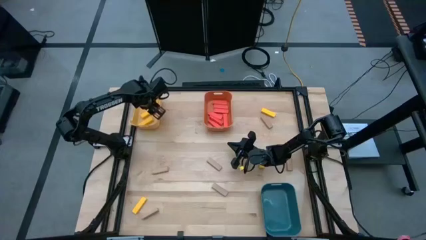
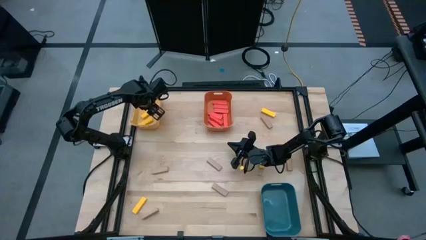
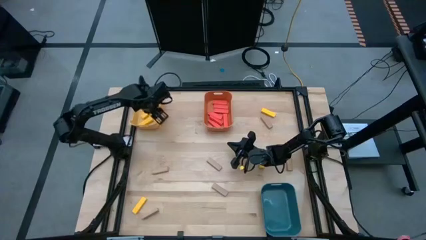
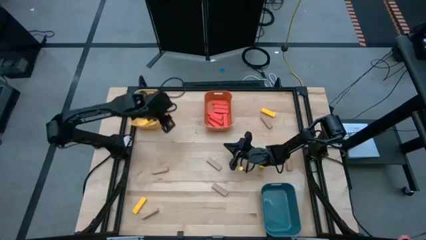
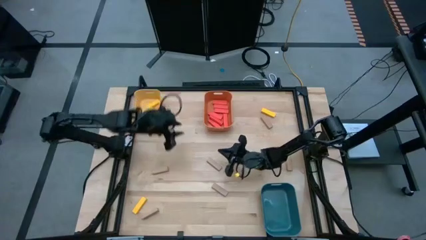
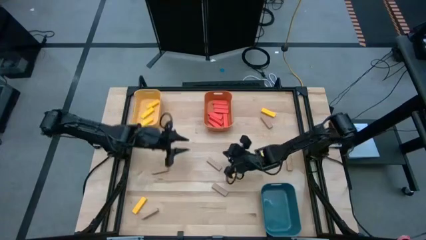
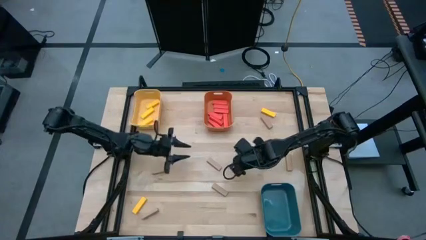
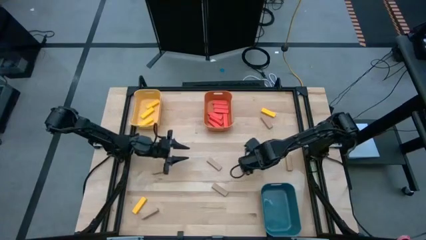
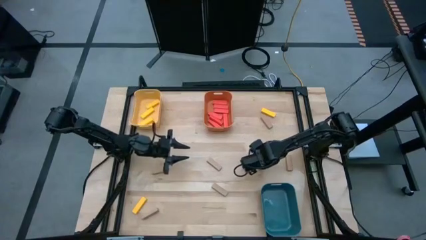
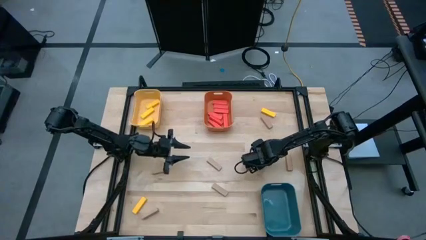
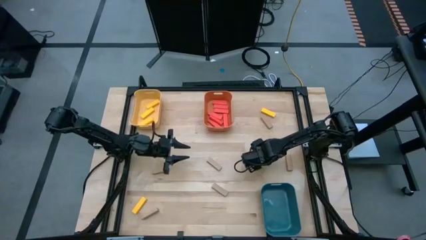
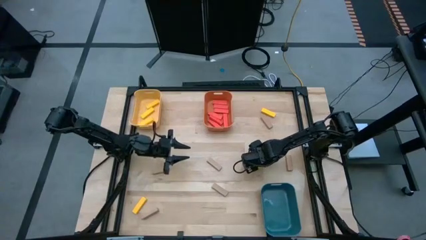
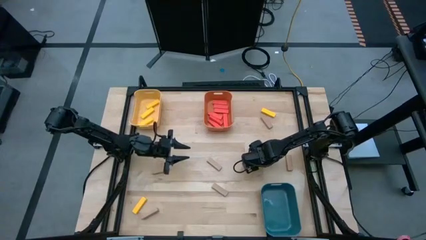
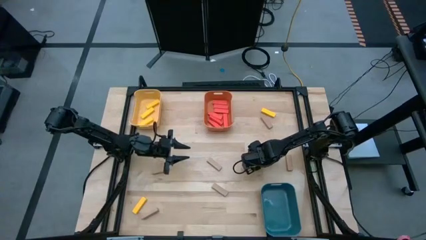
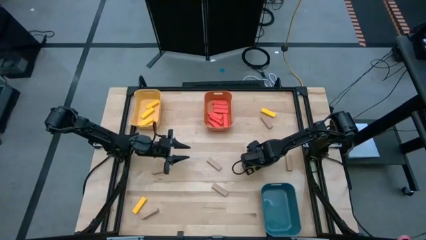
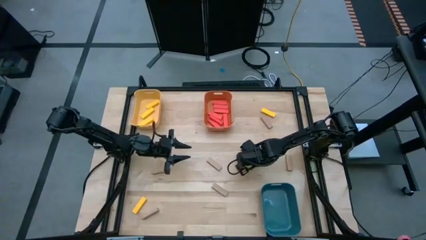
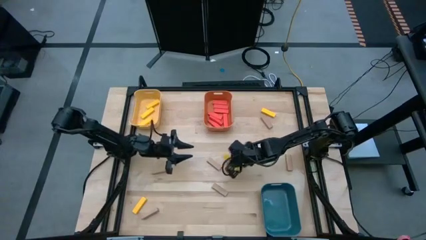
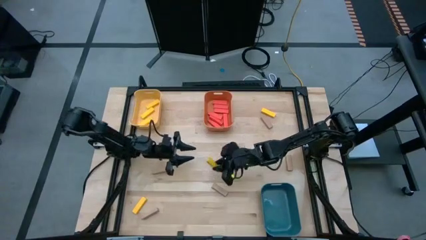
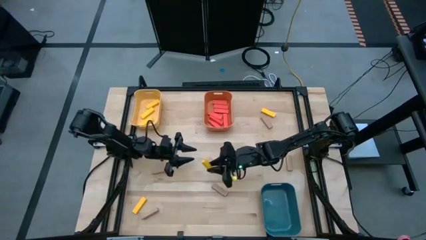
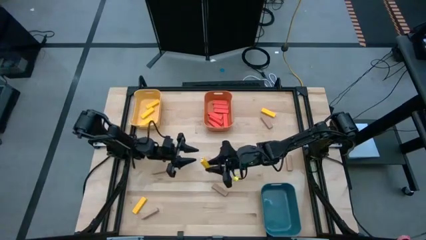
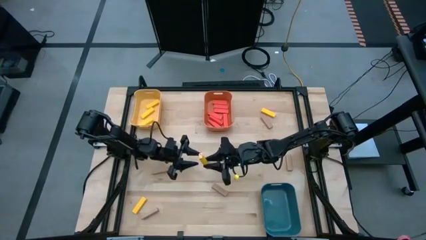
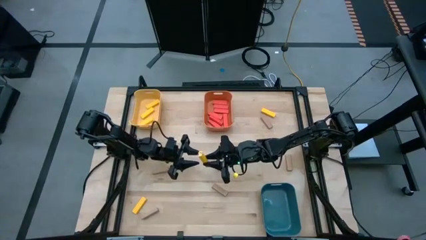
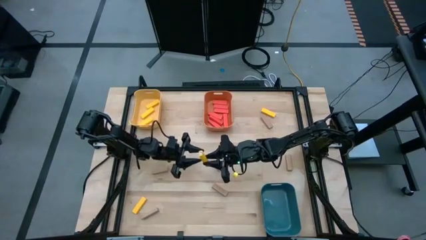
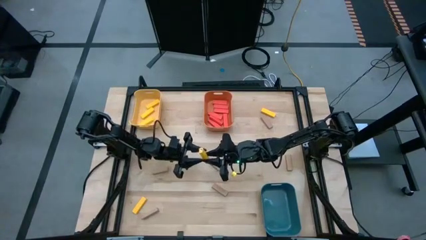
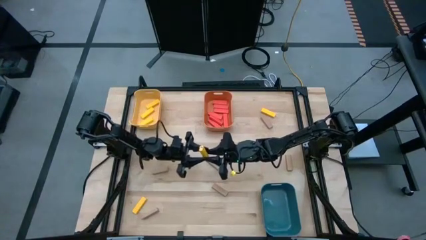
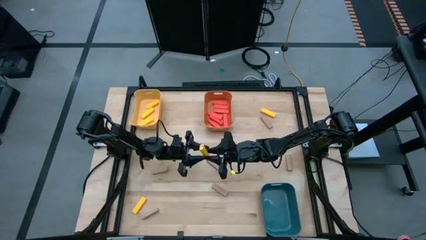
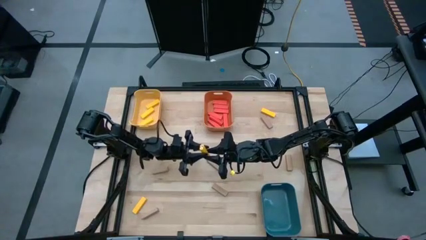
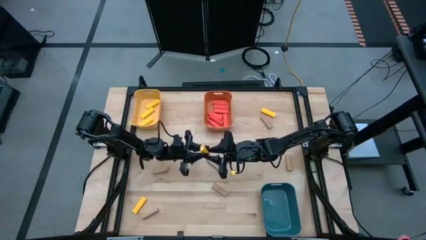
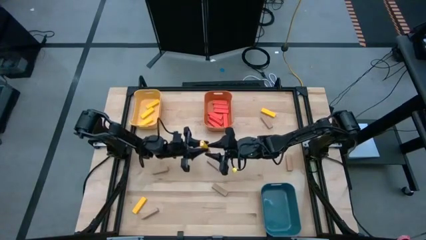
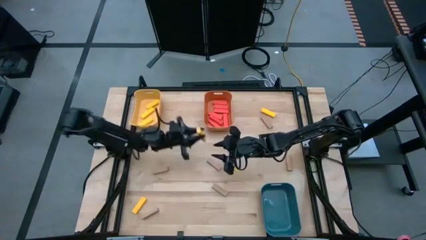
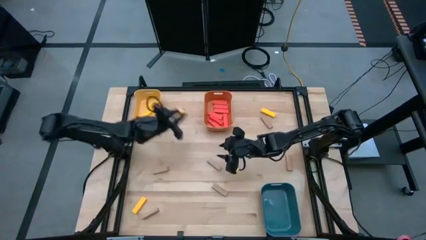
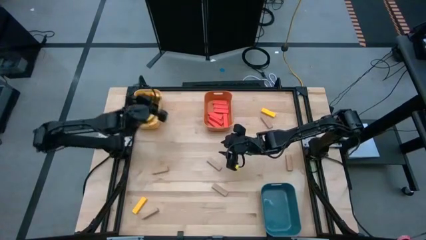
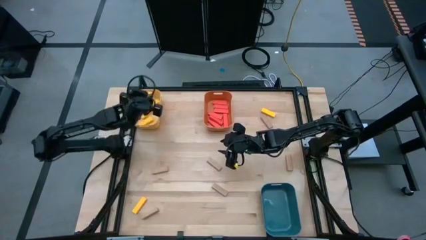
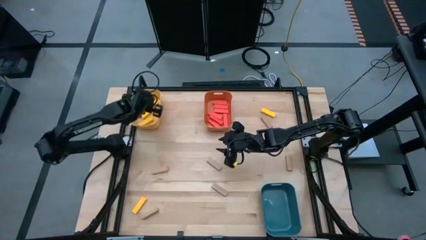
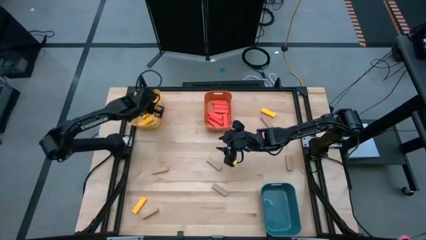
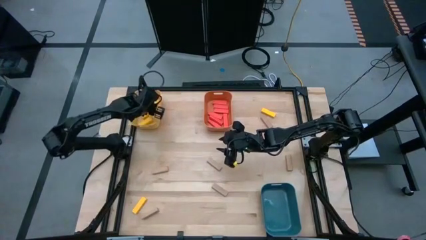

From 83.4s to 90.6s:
Task: Sort blocks
Put the yellow block into the yellow bin

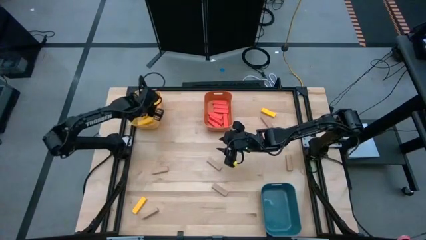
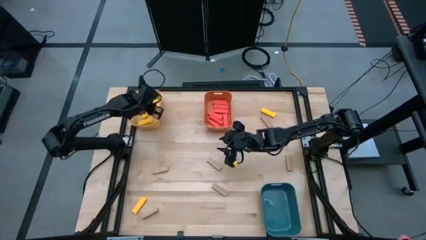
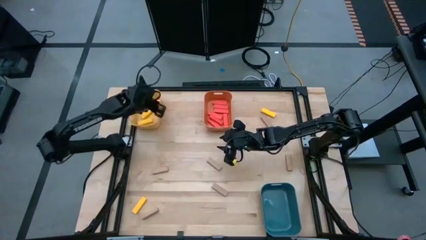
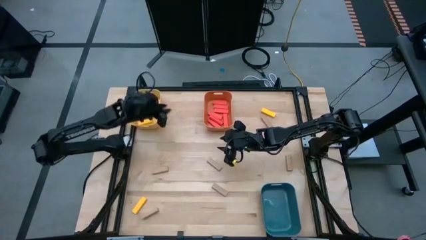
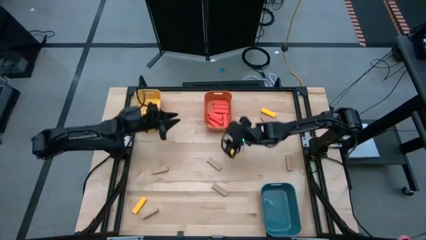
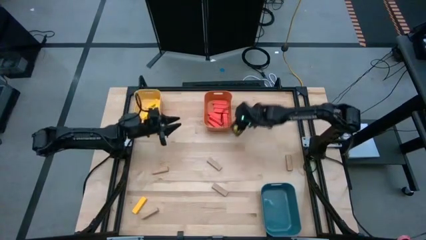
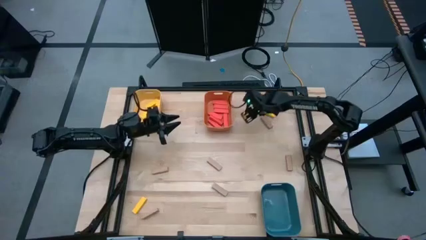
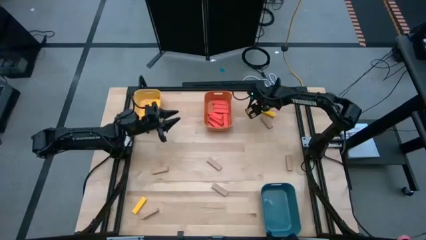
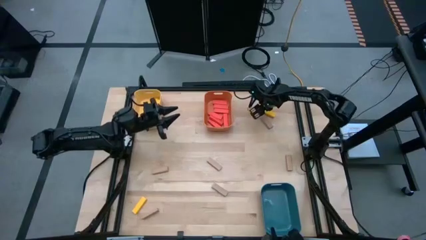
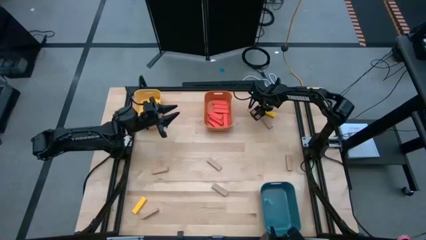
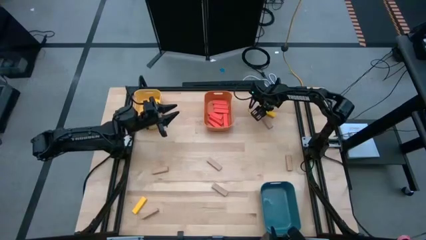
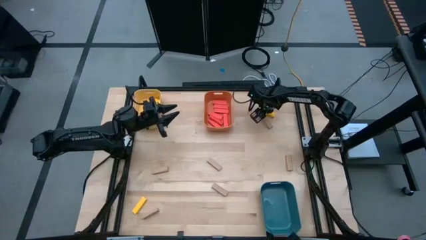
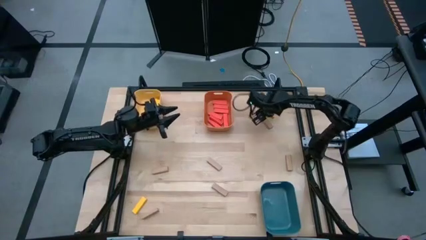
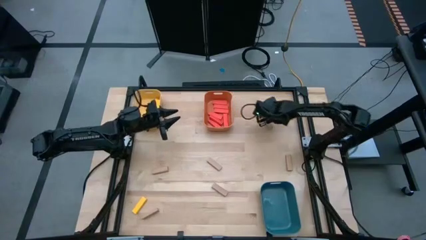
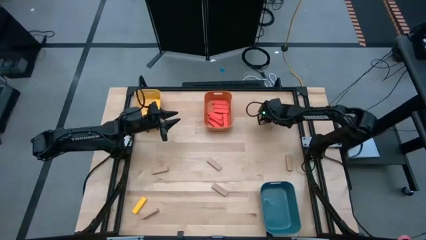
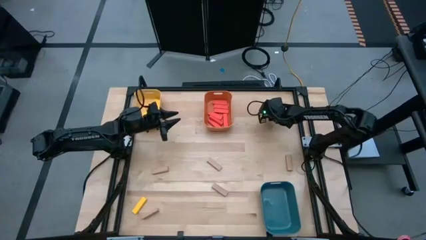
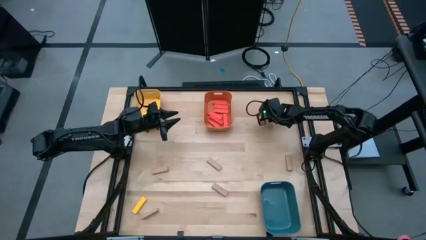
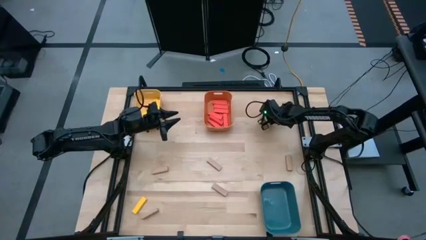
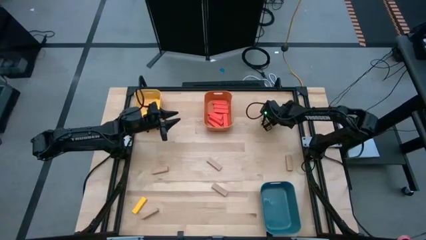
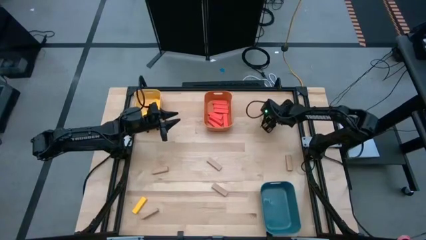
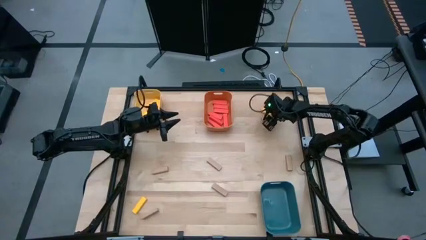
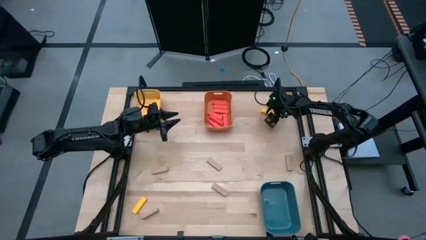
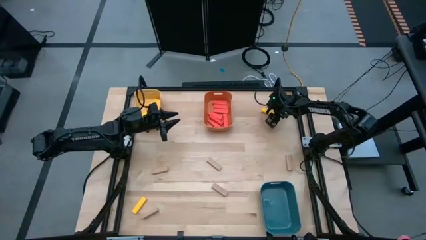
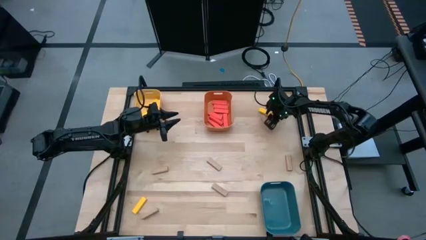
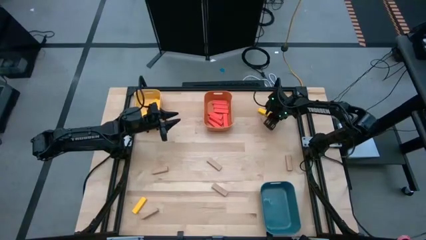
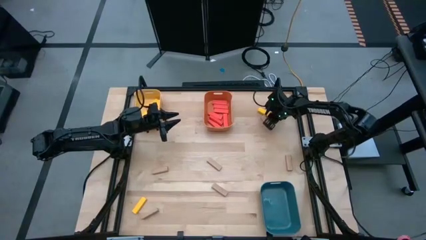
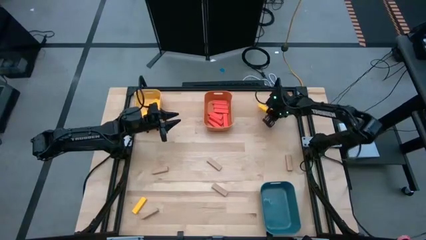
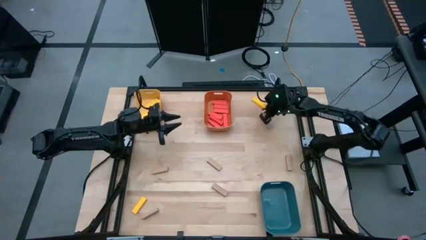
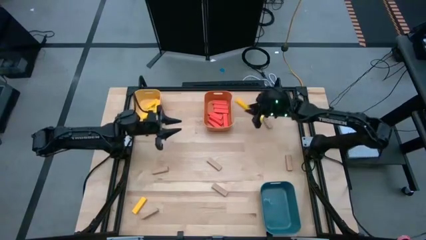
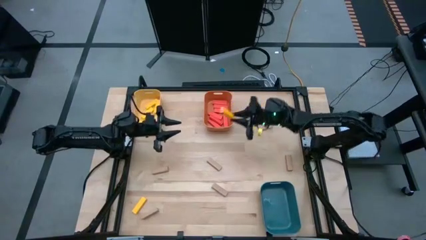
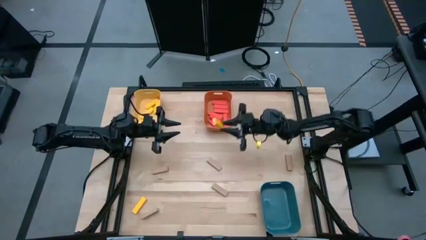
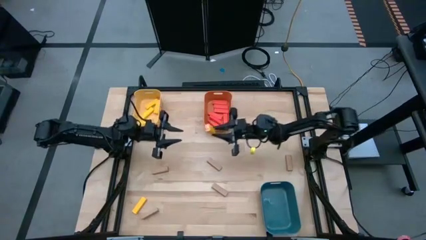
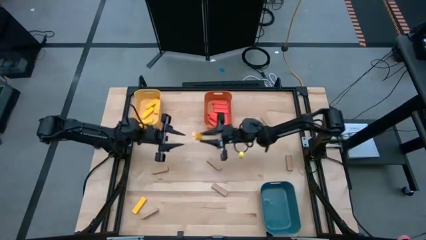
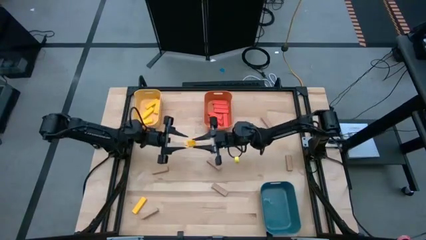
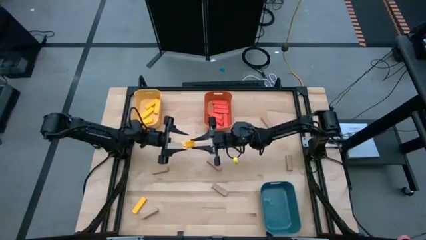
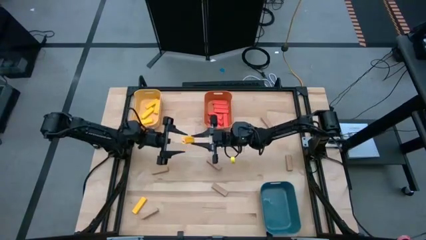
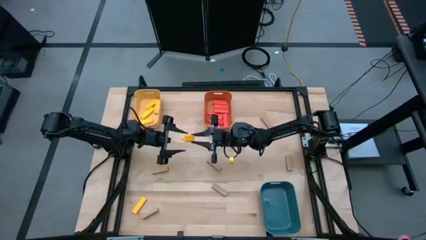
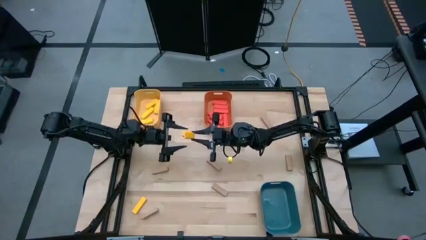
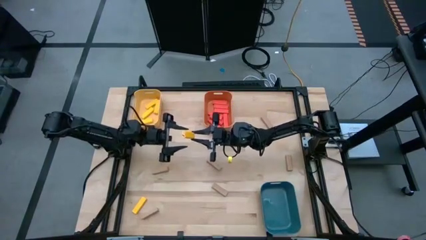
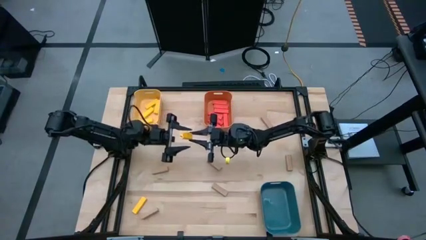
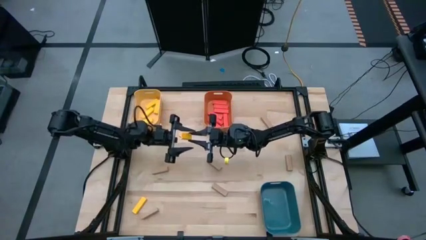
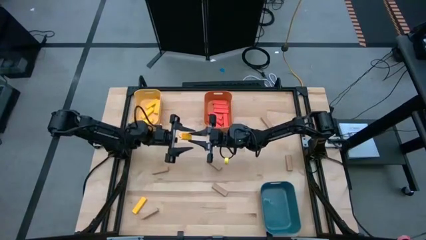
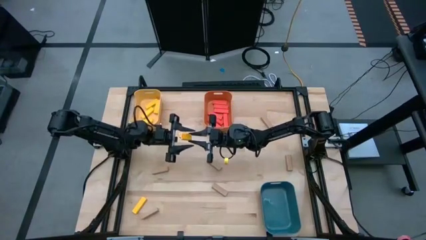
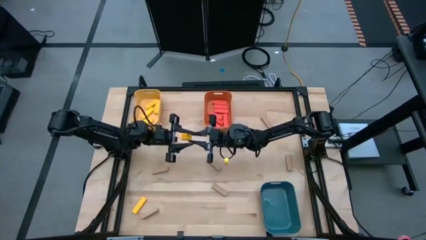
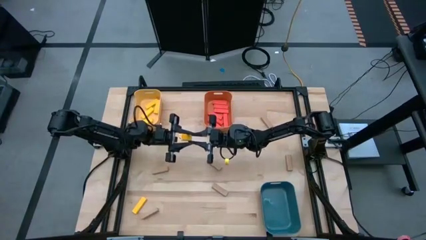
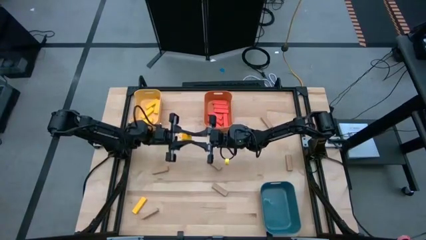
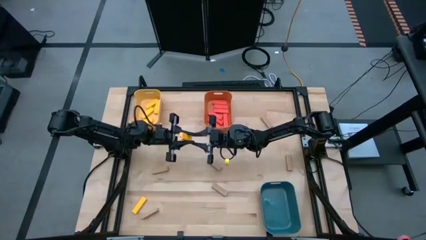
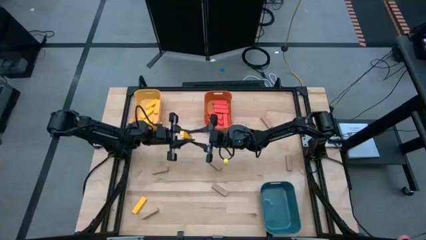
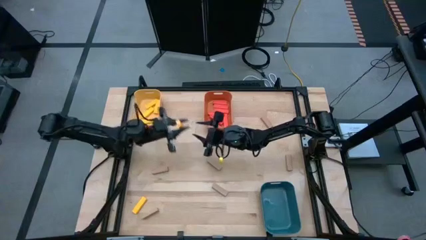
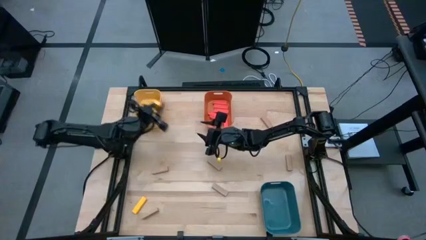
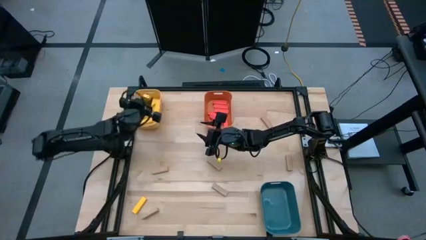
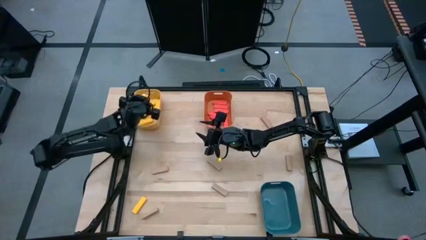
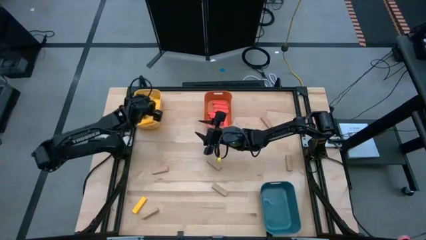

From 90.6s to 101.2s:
Put the yellow block into the yellow bin
